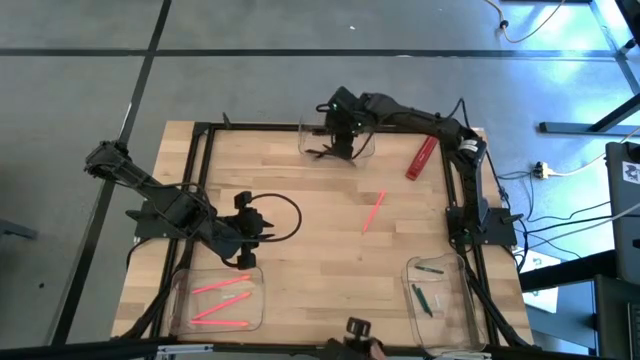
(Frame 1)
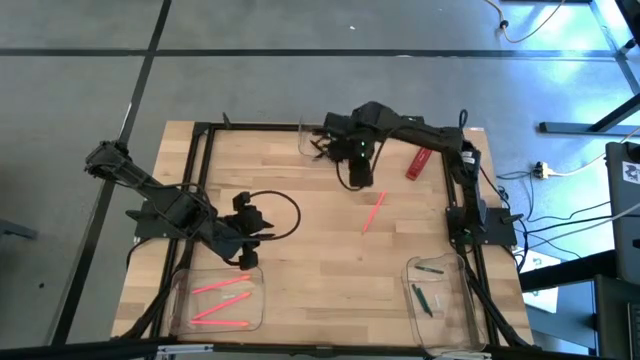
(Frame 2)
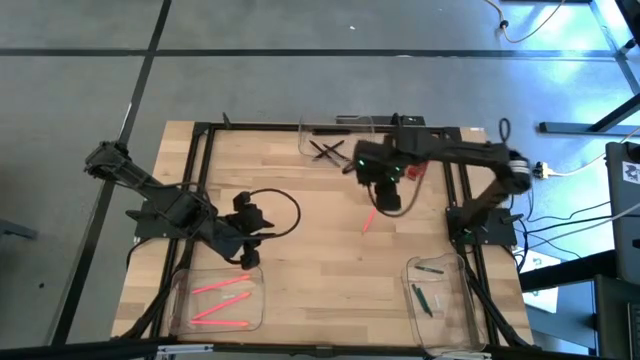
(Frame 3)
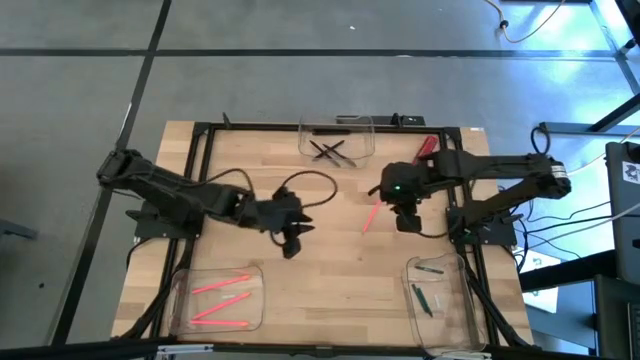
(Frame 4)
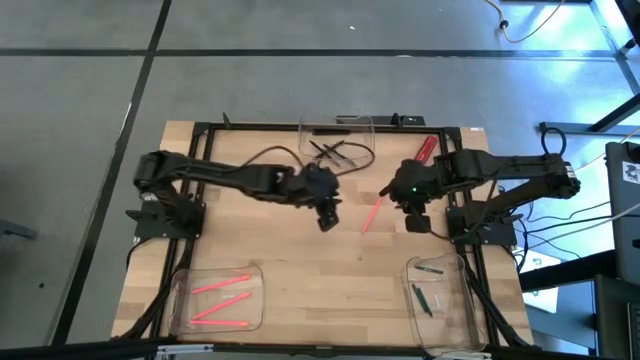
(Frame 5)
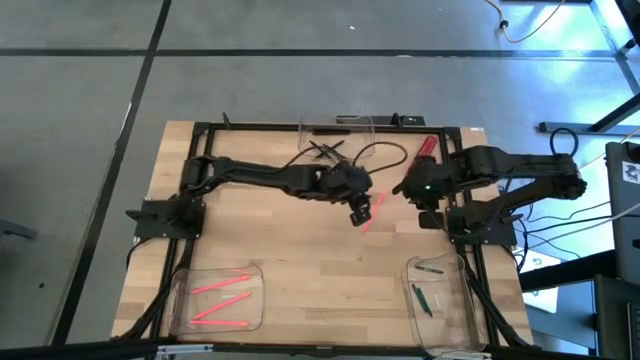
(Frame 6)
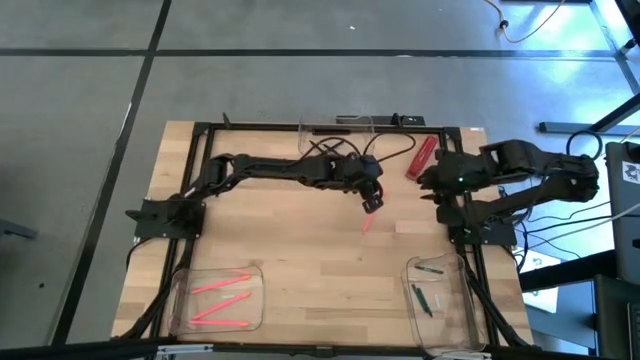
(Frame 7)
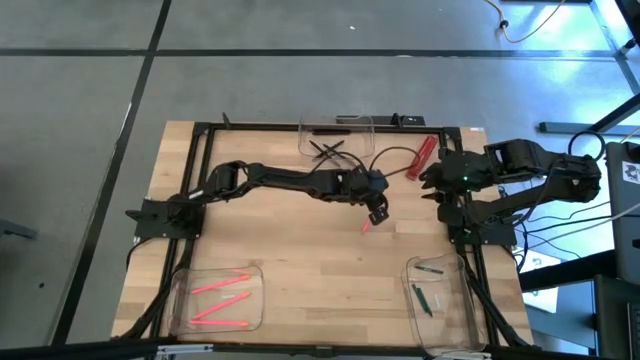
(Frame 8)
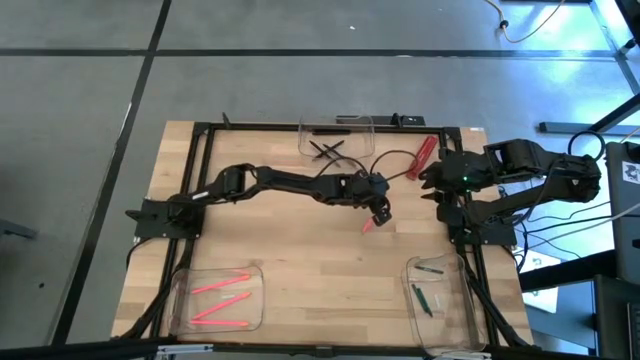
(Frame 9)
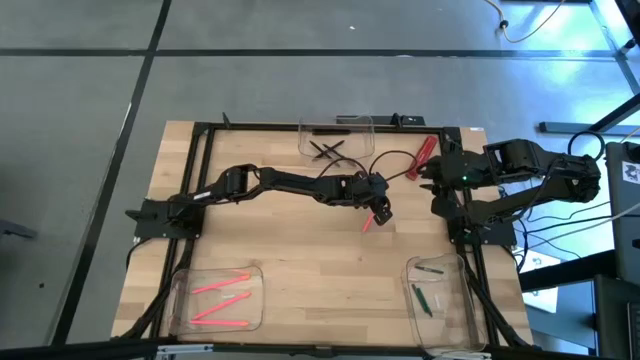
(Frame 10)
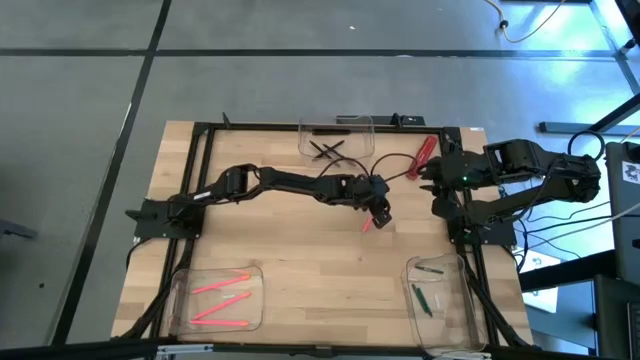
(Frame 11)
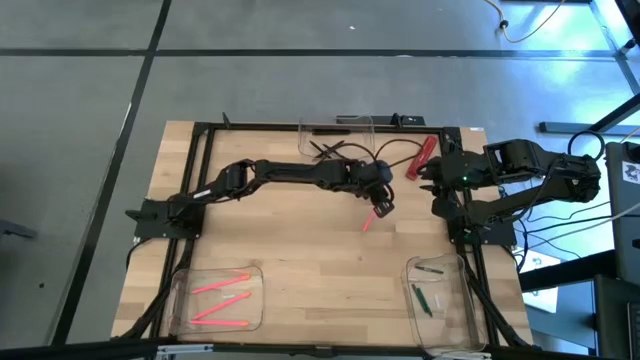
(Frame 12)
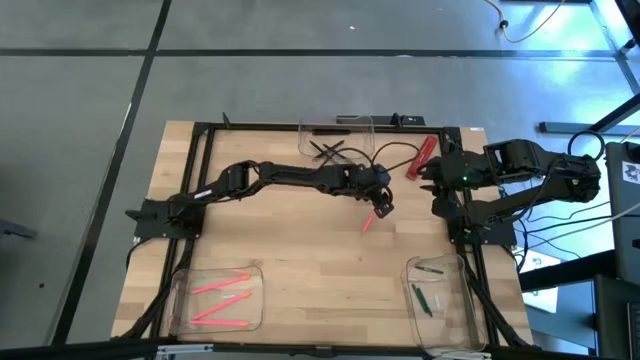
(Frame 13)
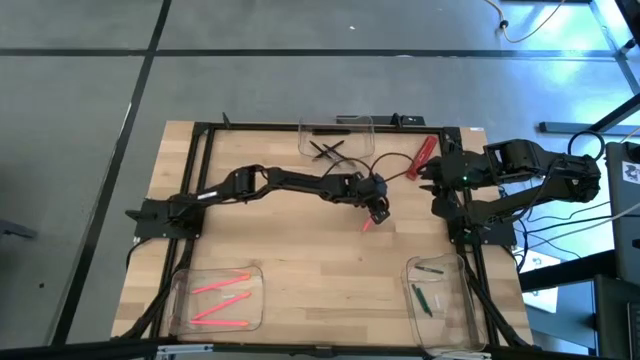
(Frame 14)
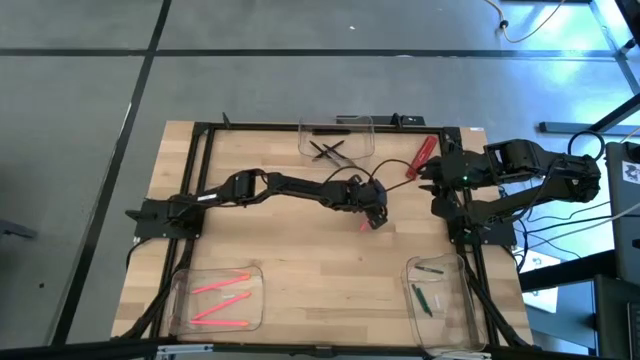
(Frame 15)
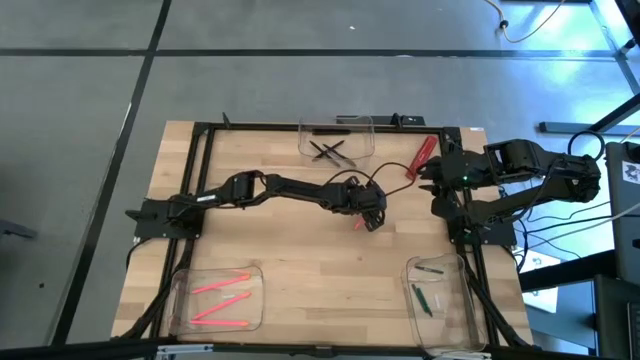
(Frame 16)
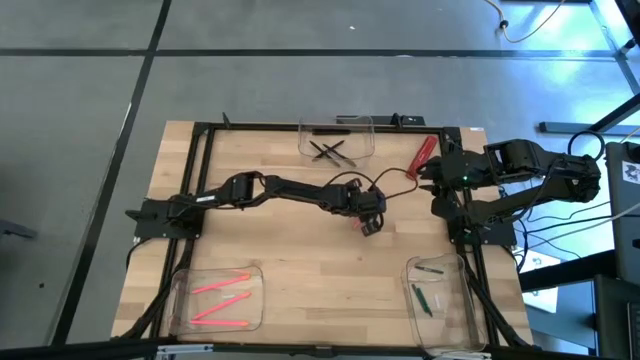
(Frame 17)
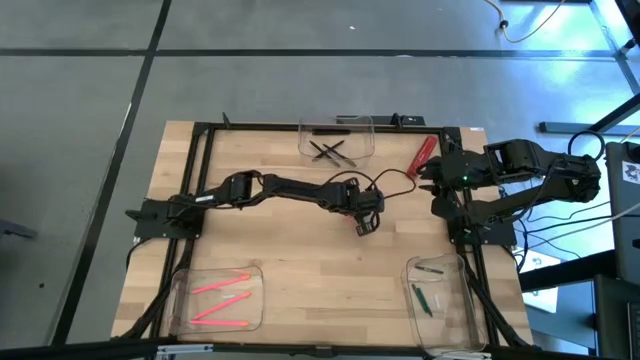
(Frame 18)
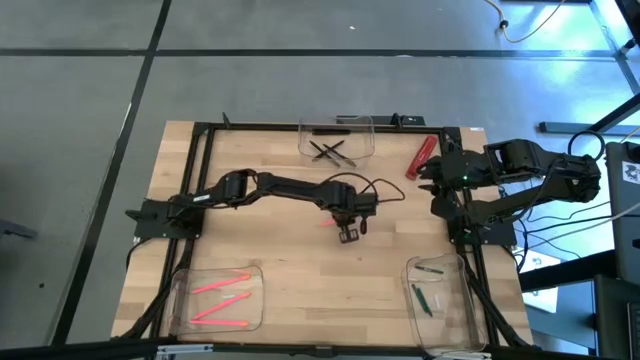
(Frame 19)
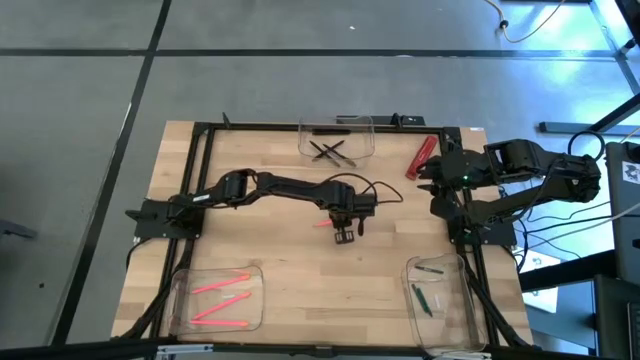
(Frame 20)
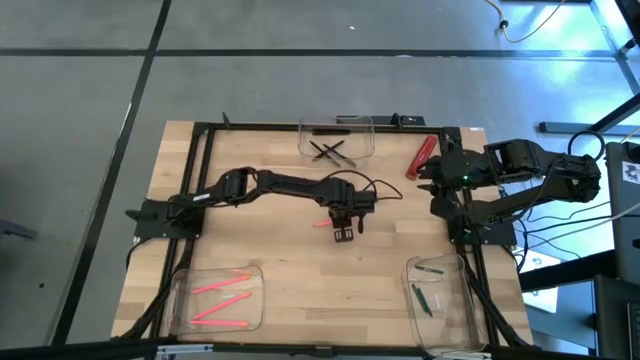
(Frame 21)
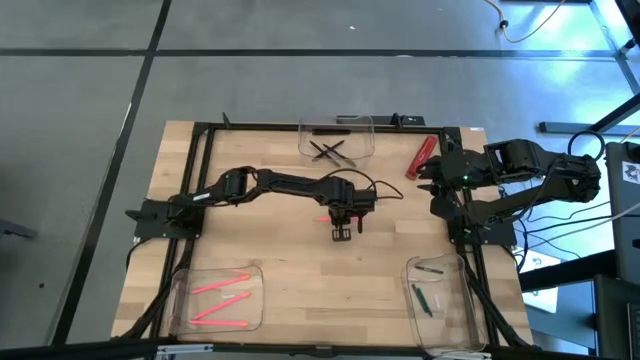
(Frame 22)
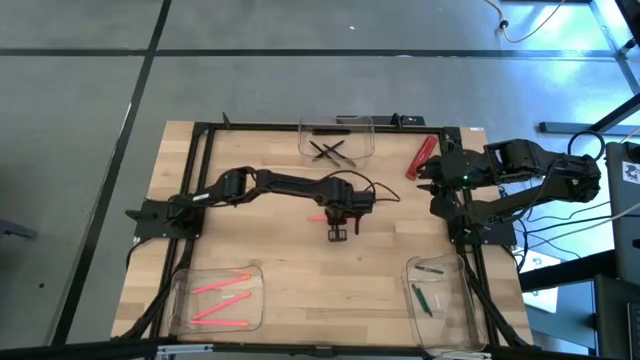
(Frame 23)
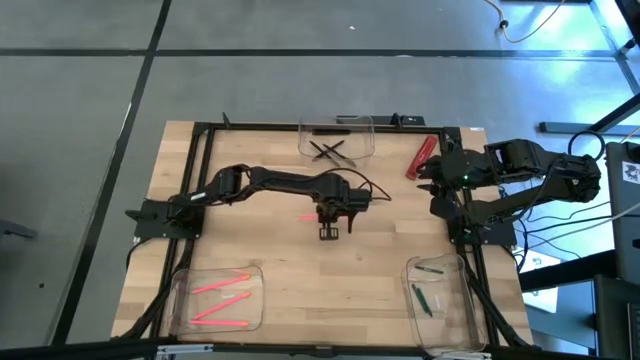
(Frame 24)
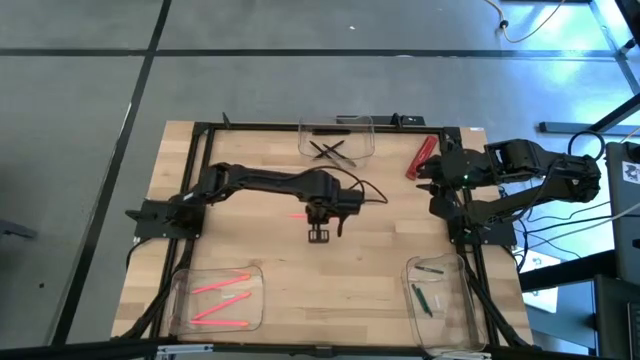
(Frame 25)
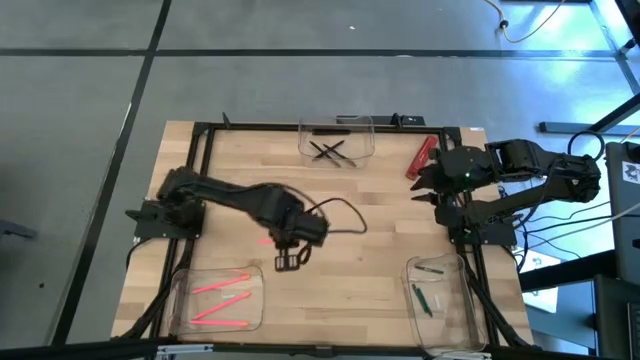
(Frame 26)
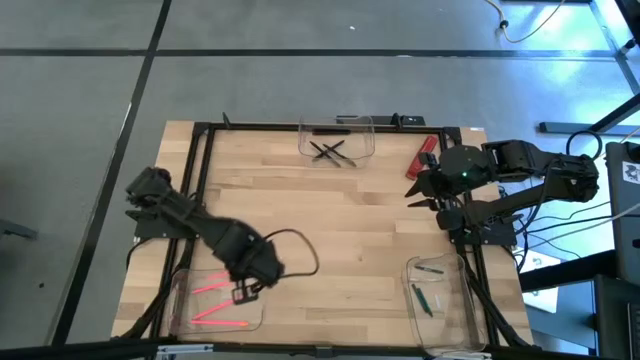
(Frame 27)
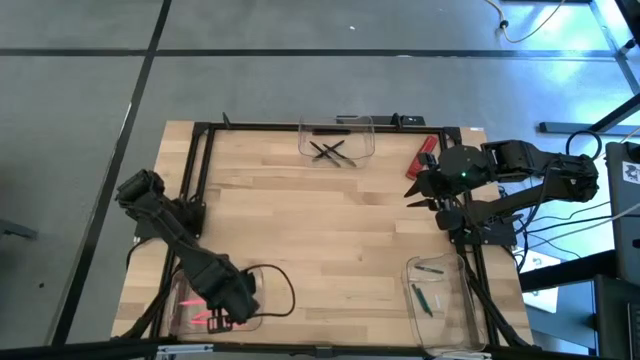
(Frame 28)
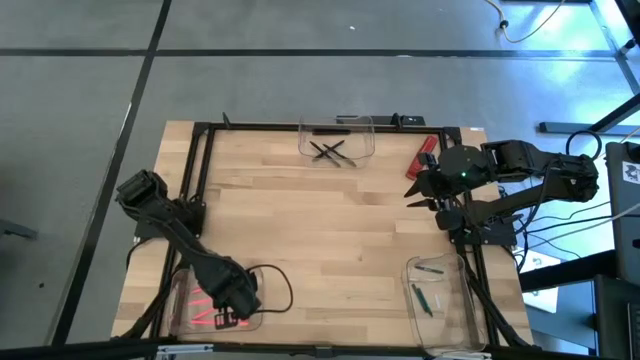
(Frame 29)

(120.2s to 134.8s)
Task: Sort crayons/erasers/pens/pencils in bins
Put the pink colored pencil into the bottom left transparent bin

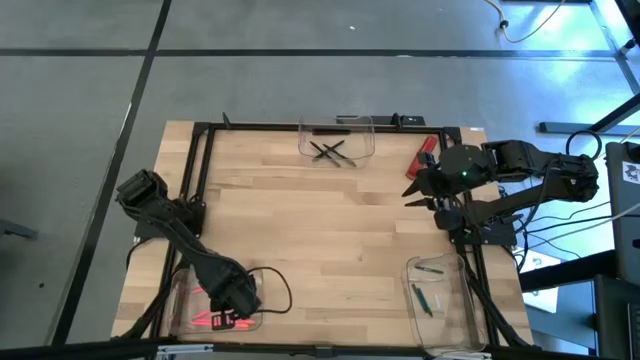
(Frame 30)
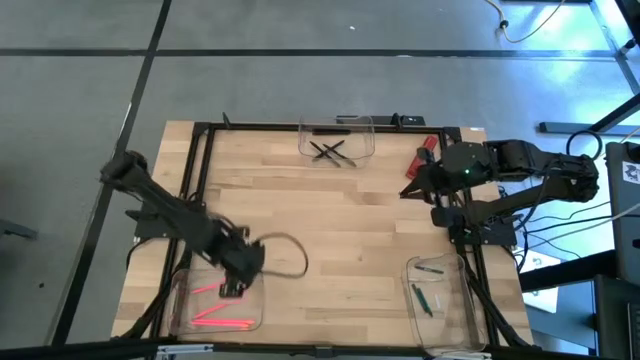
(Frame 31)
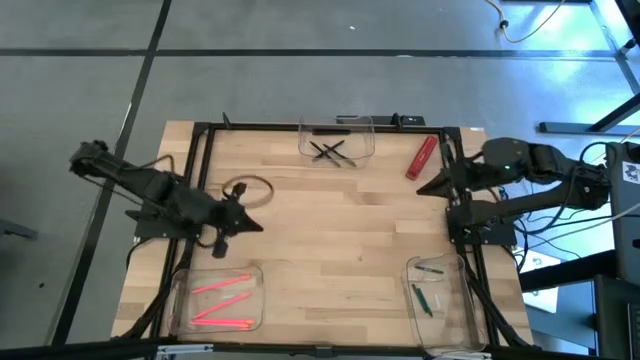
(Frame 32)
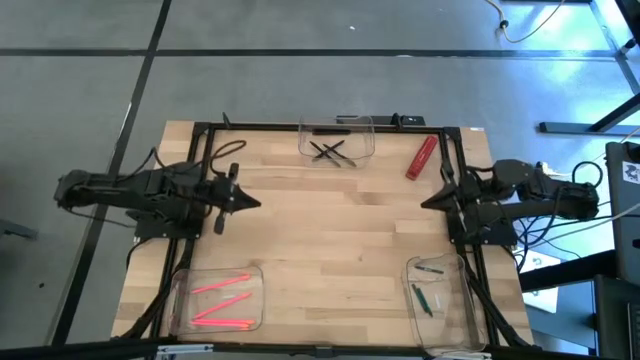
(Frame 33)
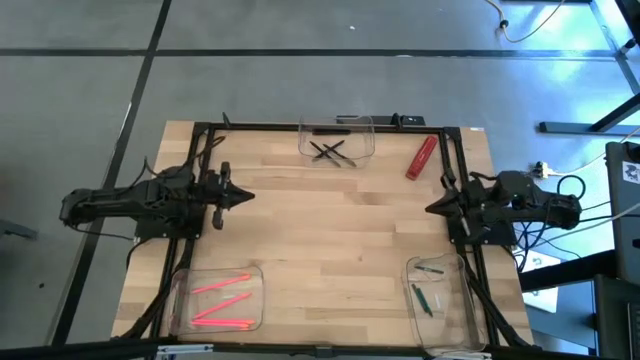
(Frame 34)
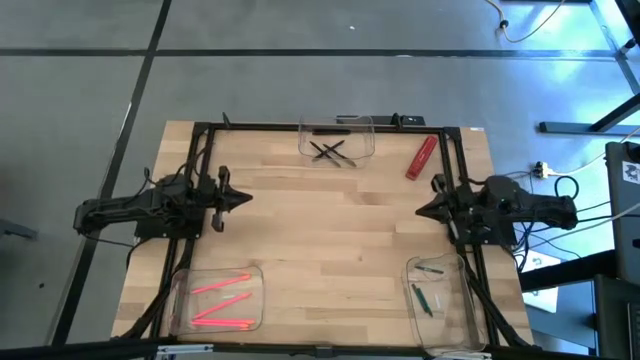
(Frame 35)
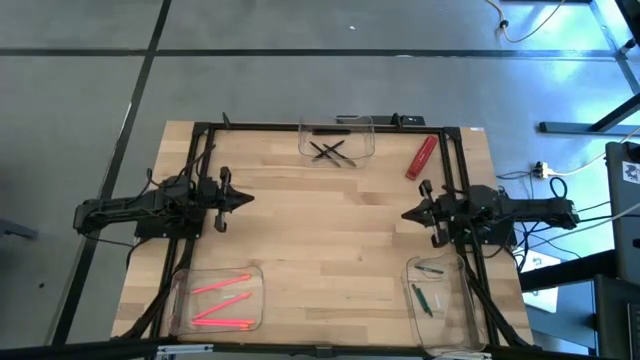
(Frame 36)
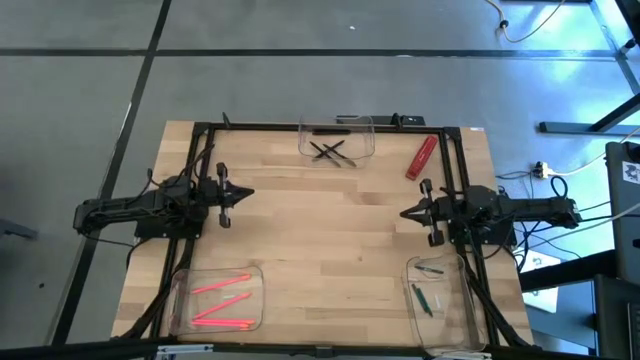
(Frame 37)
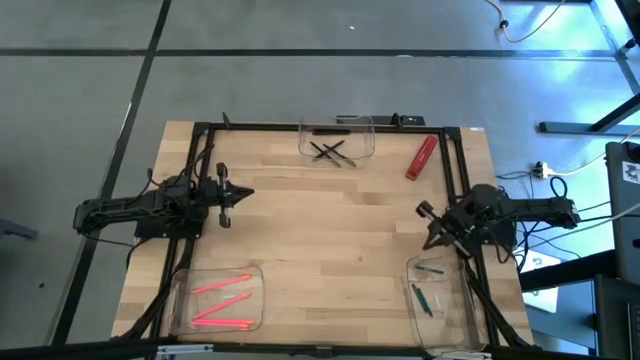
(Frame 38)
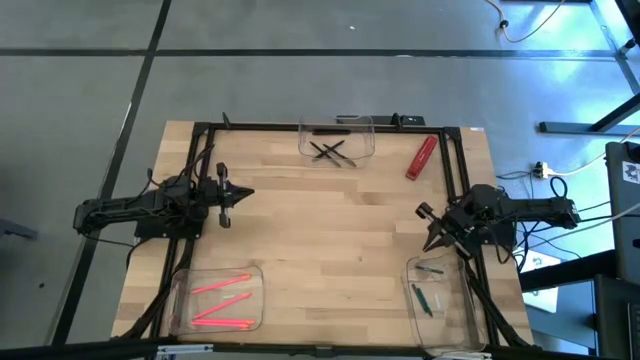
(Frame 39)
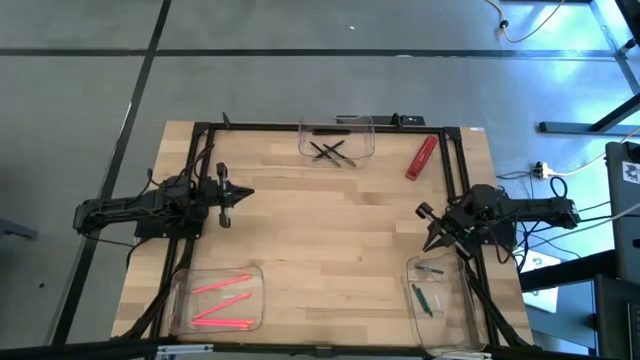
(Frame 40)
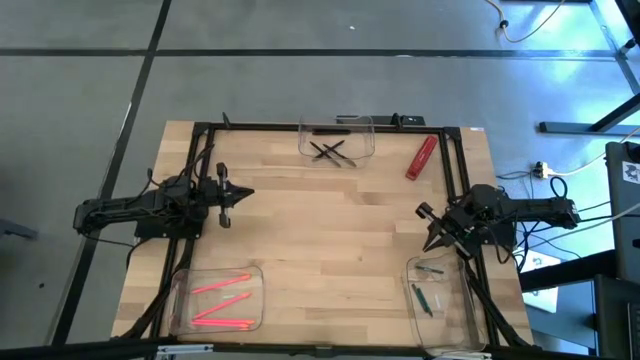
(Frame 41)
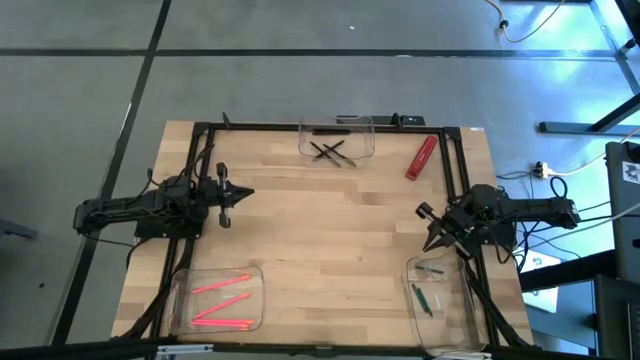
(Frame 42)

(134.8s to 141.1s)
Return to Home Position

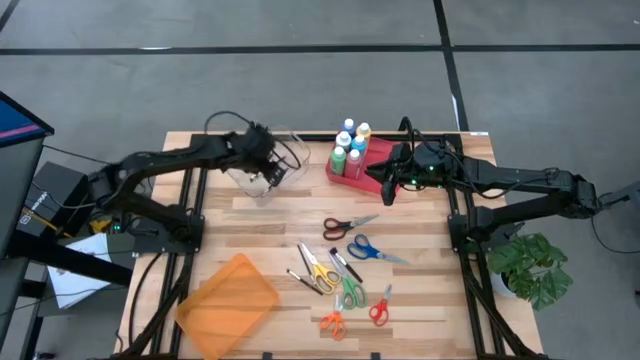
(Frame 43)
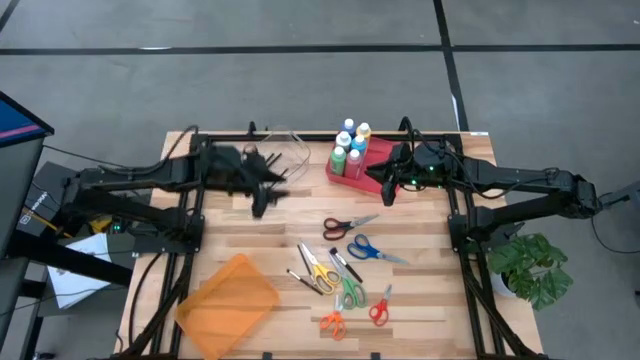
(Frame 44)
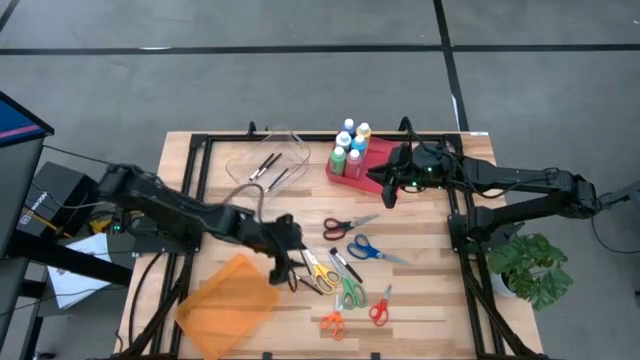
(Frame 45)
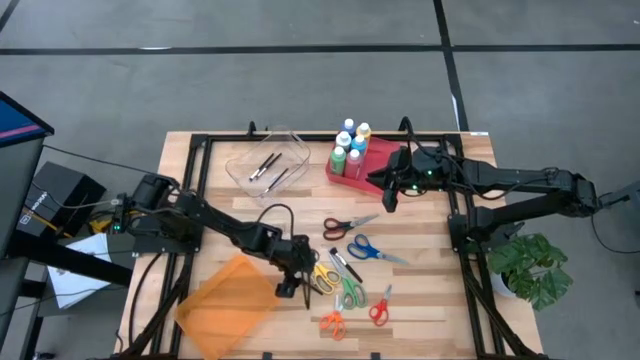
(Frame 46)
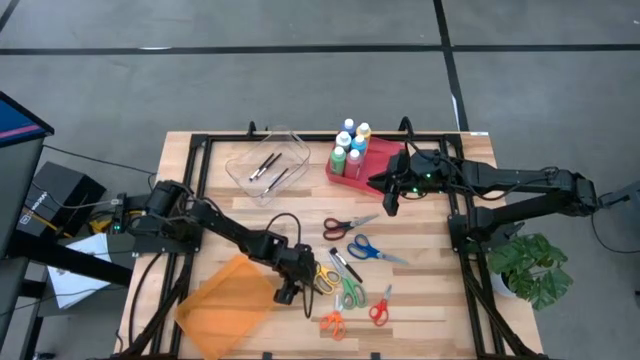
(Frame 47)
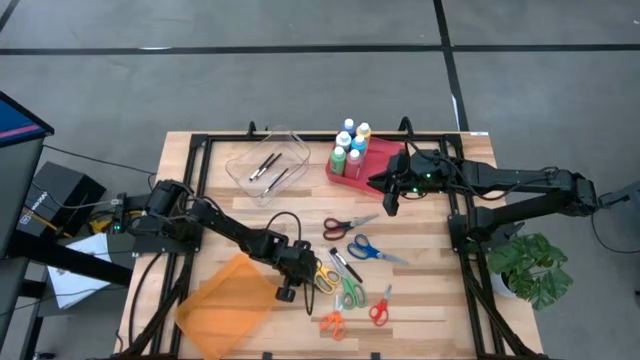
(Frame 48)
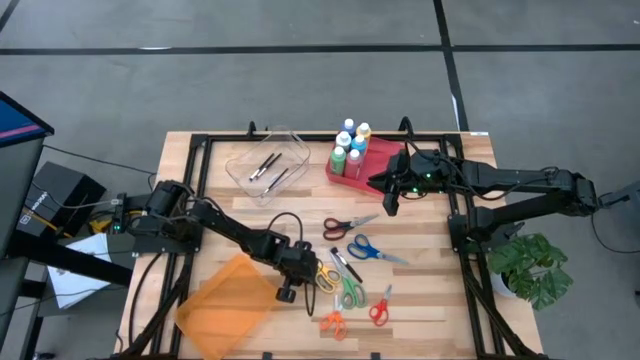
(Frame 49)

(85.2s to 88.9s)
Task: Pick & Place Paint Supplies
Put the black paint brush into the transparent bin
